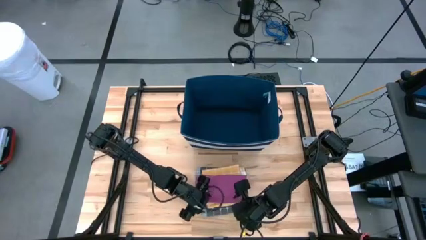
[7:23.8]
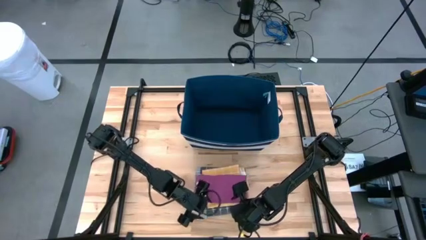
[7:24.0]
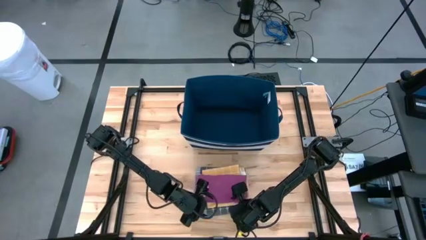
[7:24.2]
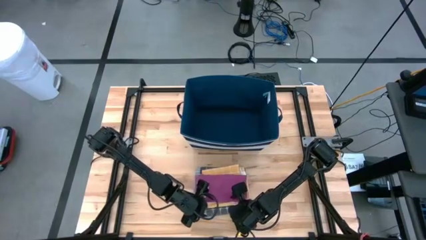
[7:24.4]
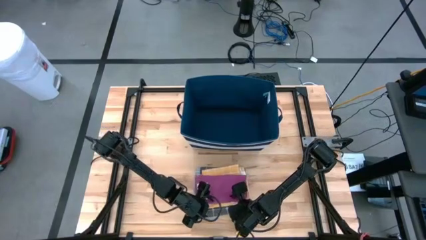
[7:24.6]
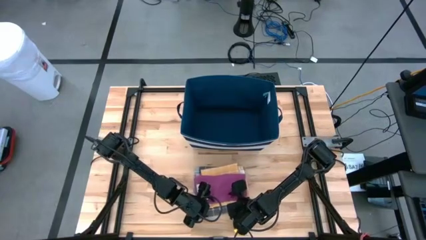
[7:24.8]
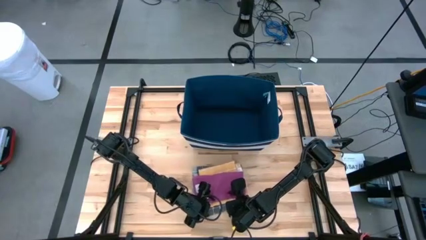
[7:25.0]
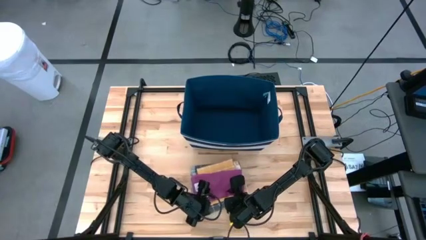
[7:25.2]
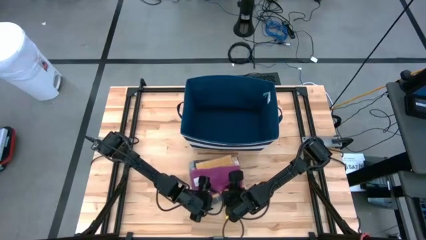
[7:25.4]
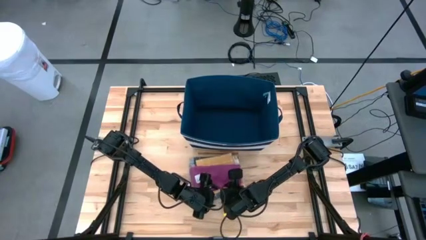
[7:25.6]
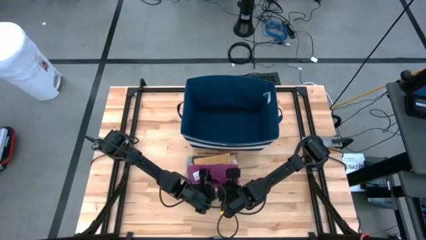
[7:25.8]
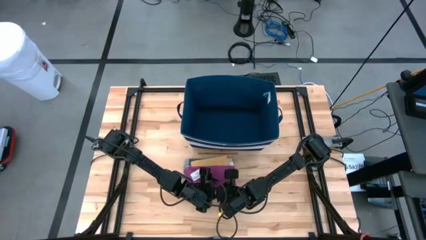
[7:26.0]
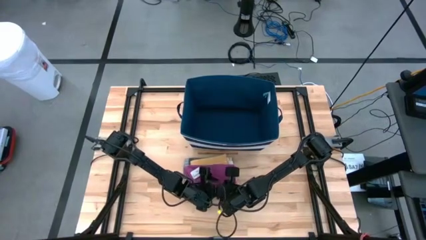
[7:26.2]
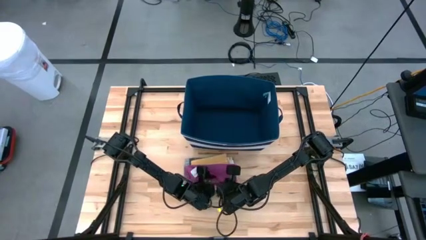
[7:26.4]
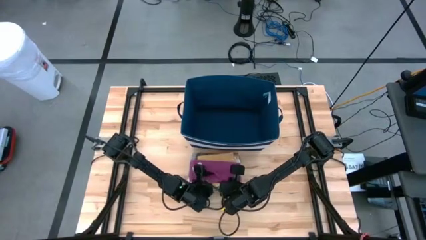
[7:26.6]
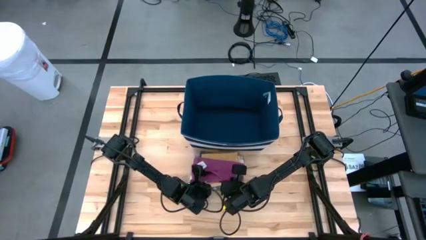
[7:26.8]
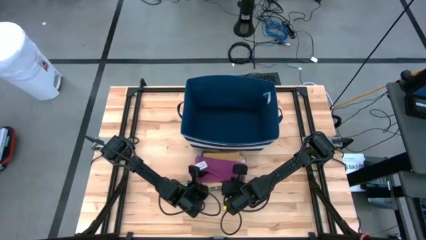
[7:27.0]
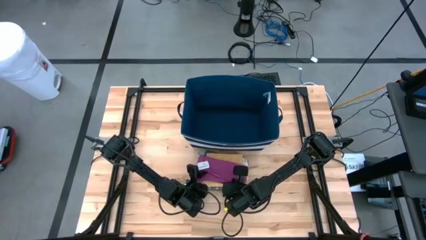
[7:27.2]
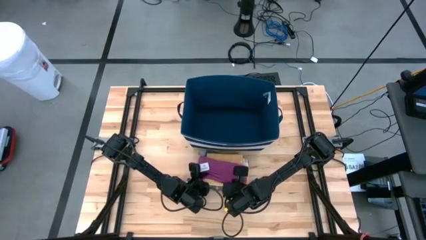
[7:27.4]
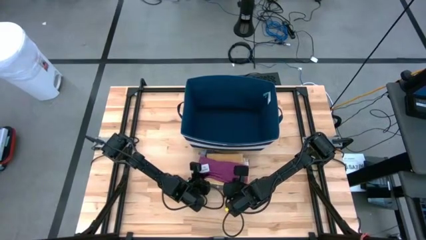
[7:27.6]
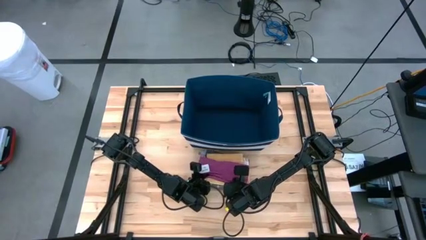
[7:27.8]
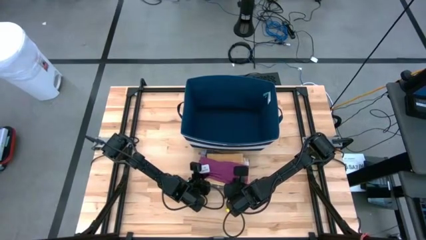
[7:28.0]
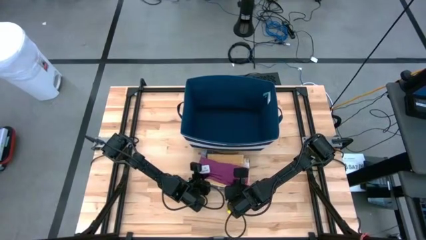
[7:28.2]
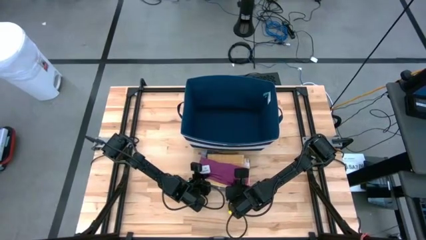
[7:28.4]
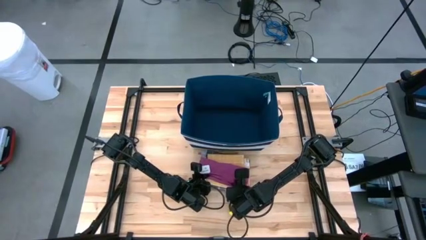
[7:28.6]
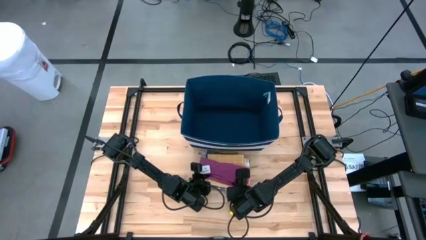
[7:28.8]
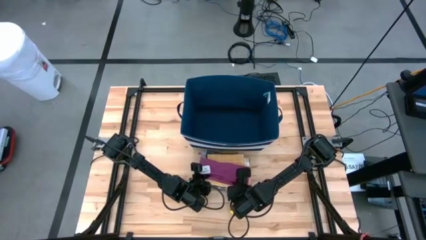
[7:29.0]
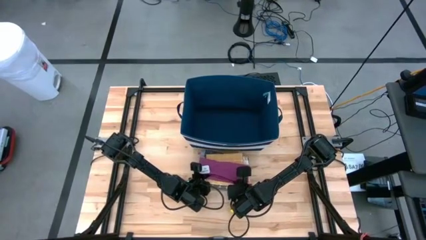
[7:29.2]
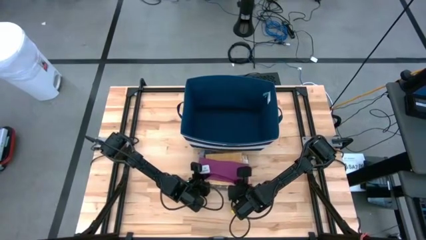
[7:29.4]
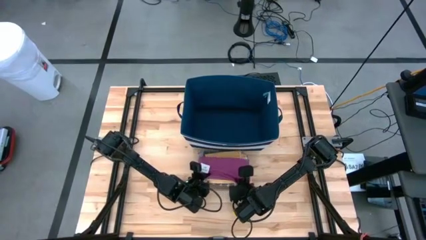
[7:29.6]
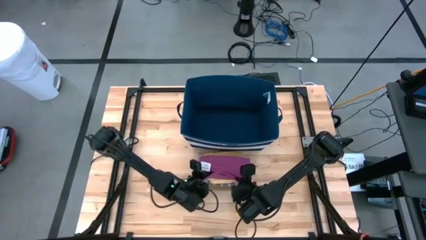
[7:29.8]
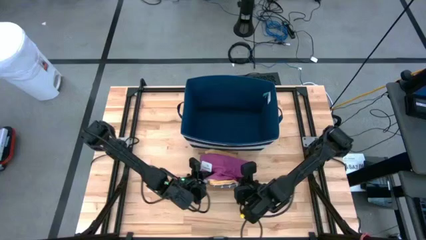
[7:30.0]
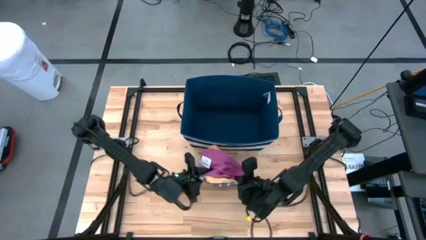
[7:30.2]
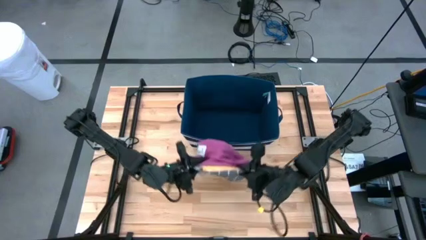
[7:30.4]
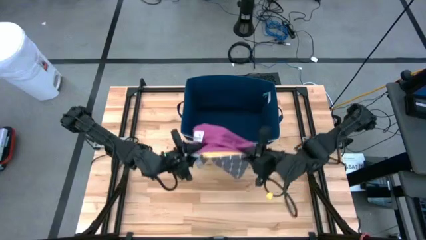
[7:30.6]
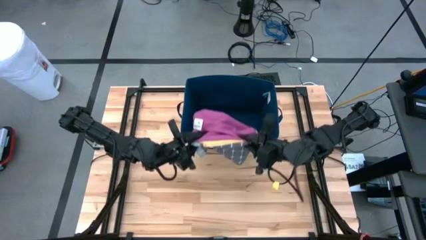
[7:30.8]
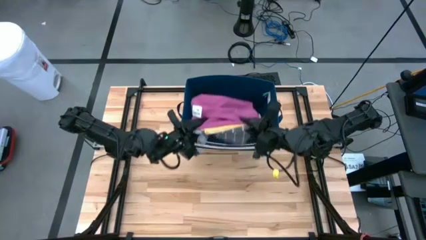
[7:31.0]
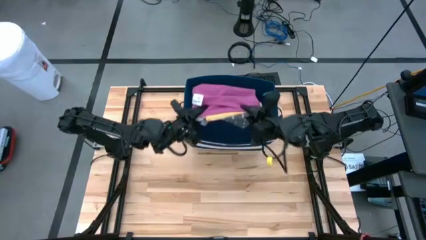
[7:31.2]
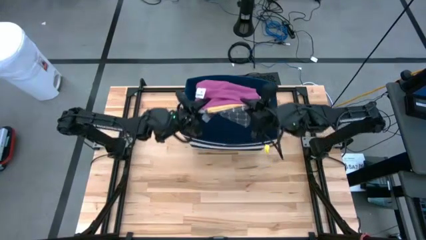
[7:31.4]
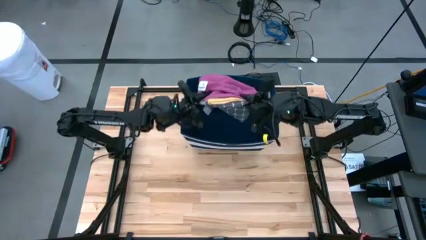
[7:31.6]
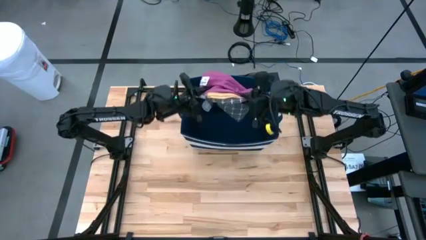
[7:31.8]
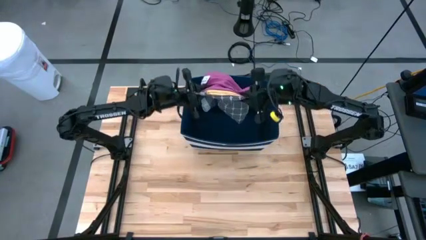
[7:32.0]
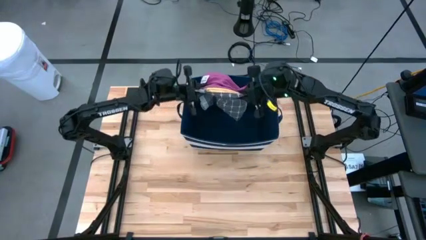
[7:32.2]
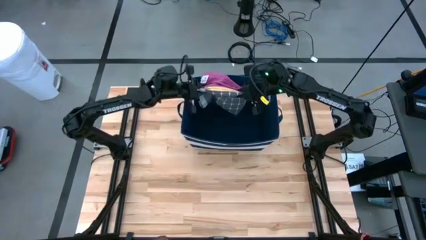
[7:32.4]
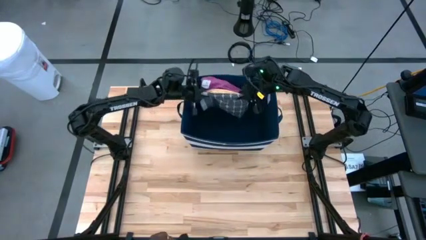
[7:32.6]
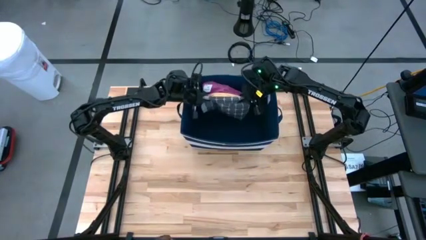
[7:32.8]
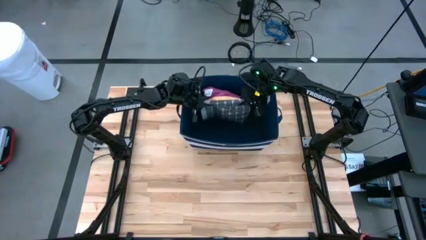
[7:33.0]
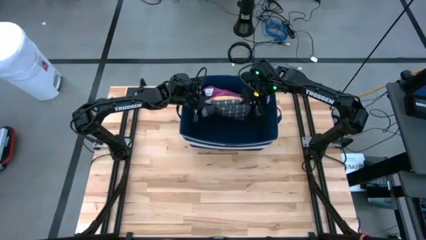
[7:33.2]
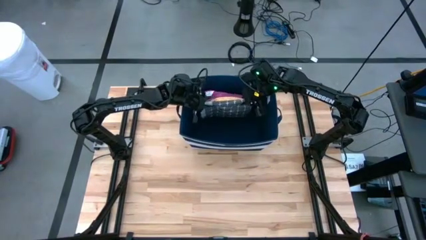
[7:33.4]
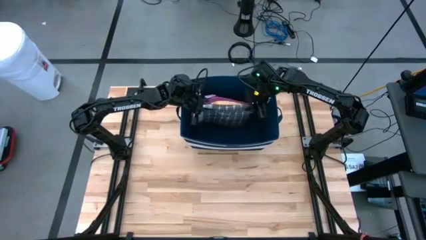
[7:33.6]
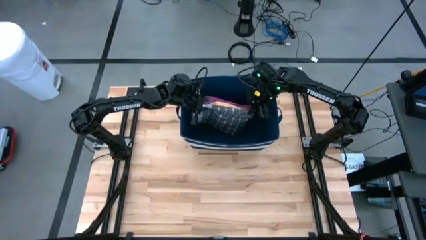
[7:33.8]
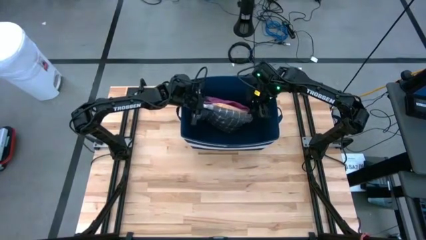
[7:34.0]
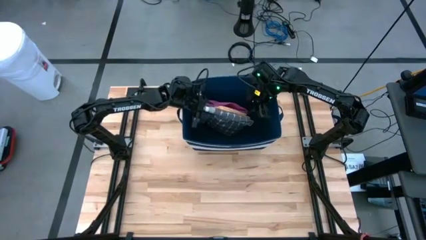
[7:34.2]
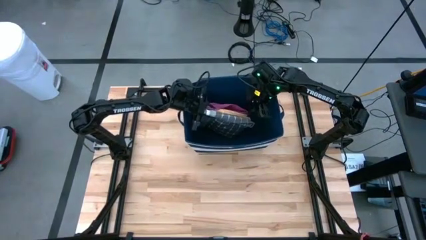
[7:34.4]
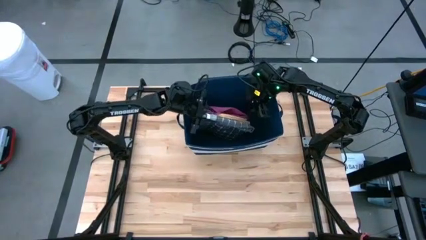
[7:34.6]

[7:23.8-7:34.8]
Task: Fold towel
Put the stacked towels into the blue bin

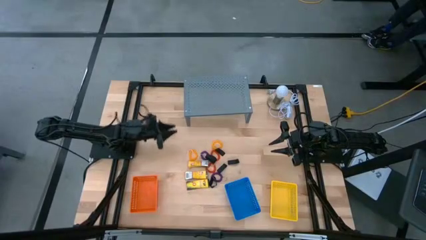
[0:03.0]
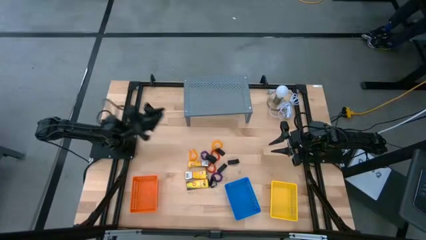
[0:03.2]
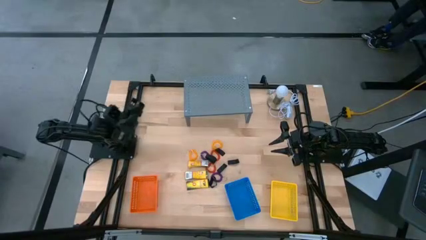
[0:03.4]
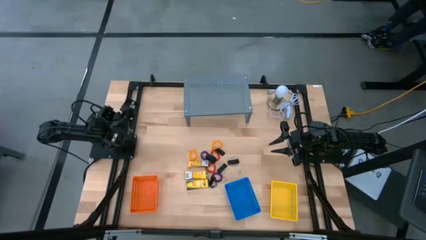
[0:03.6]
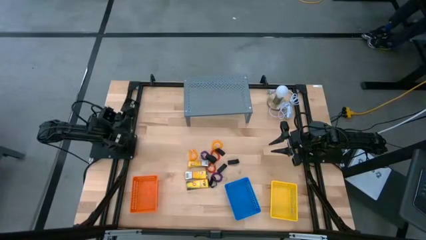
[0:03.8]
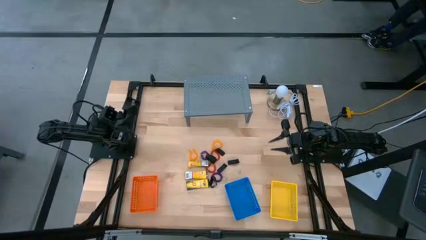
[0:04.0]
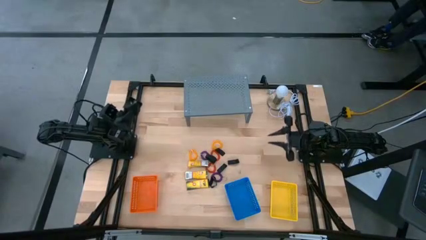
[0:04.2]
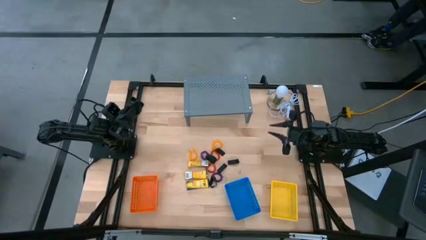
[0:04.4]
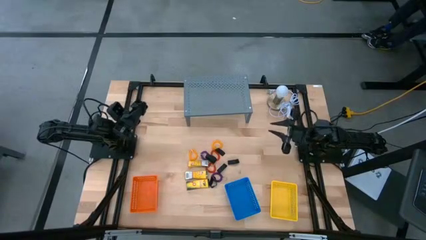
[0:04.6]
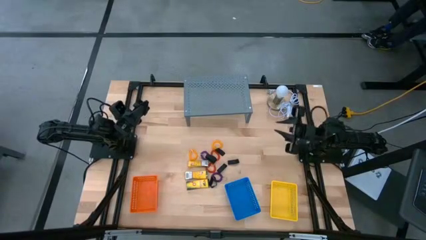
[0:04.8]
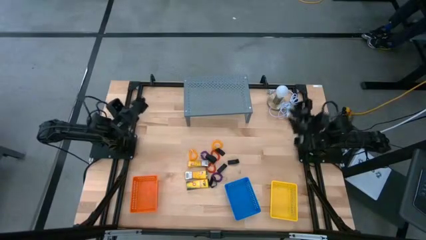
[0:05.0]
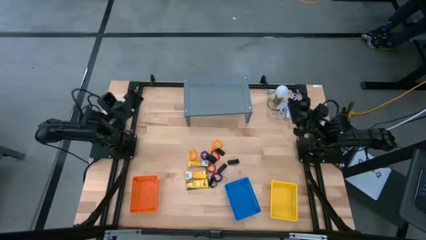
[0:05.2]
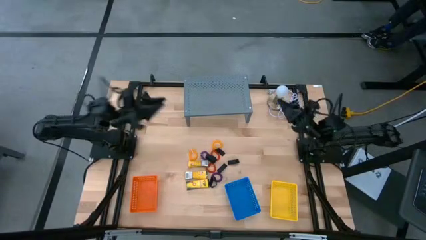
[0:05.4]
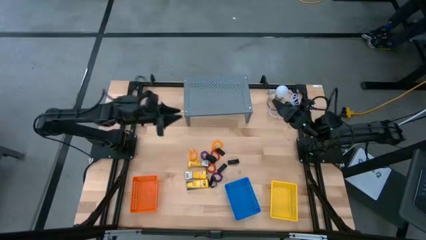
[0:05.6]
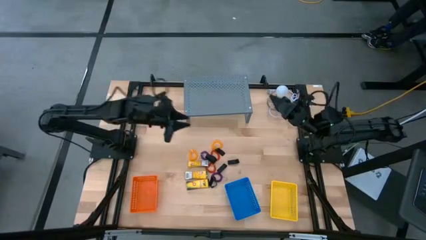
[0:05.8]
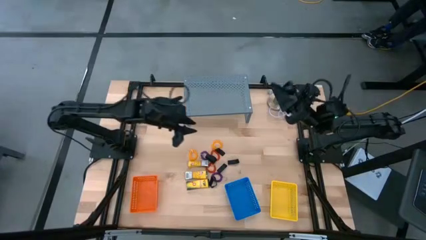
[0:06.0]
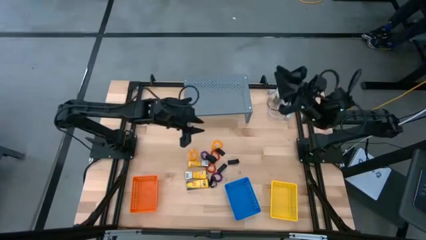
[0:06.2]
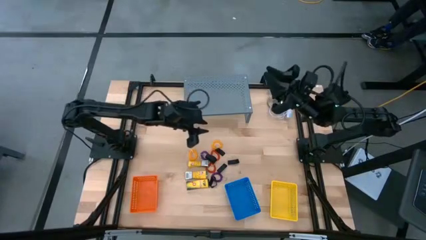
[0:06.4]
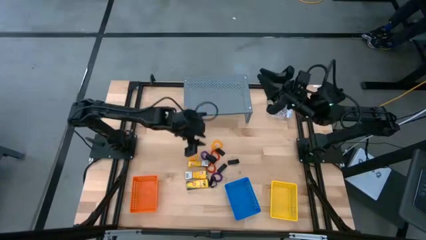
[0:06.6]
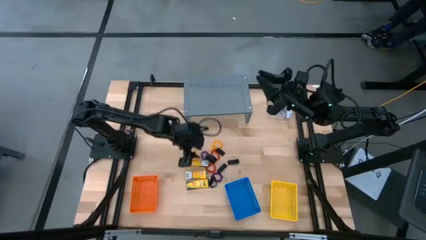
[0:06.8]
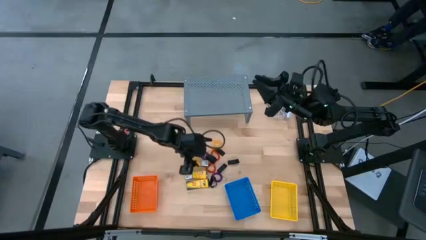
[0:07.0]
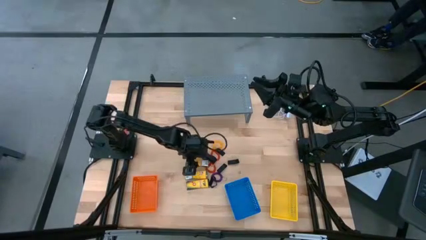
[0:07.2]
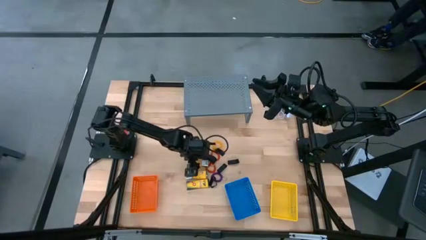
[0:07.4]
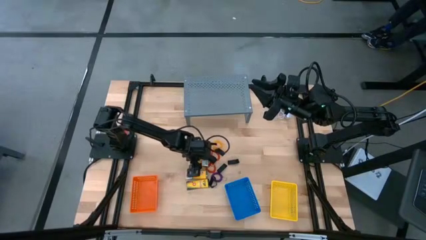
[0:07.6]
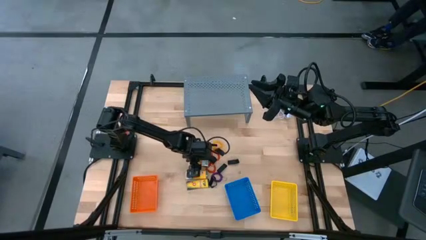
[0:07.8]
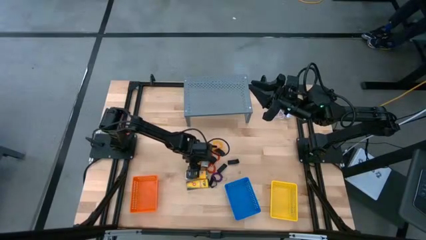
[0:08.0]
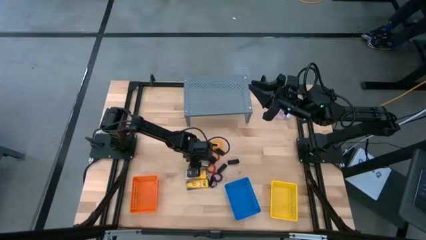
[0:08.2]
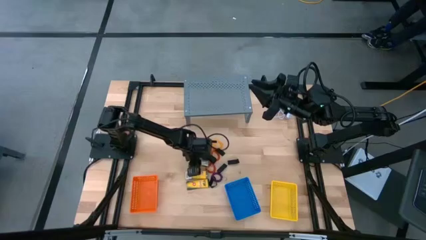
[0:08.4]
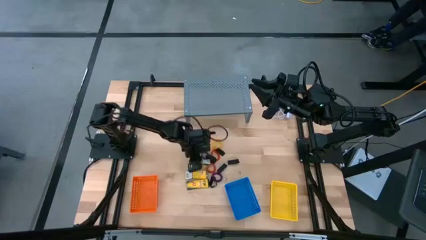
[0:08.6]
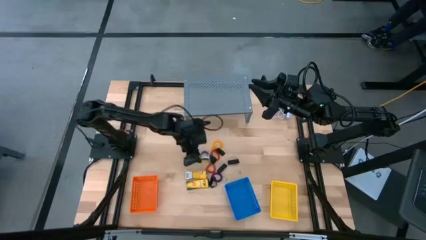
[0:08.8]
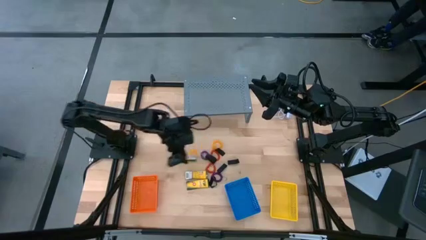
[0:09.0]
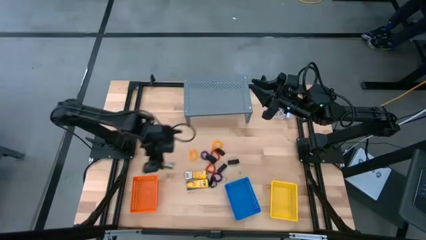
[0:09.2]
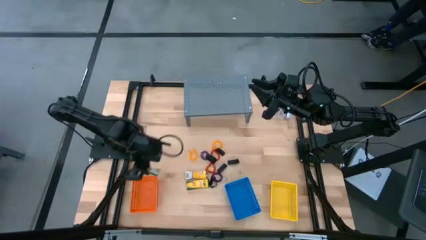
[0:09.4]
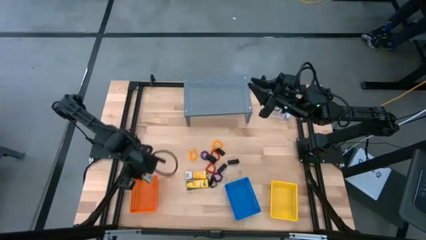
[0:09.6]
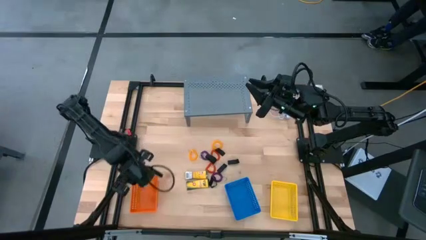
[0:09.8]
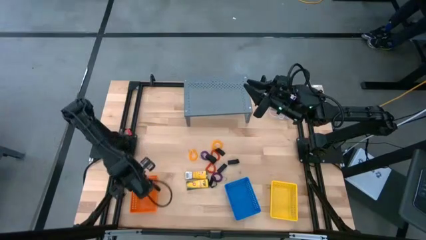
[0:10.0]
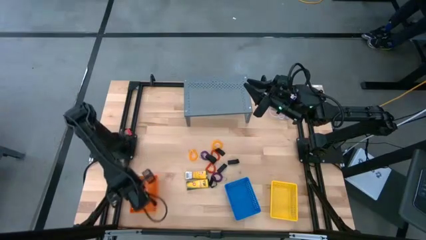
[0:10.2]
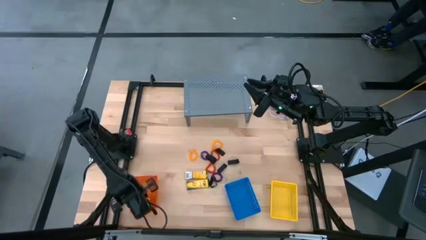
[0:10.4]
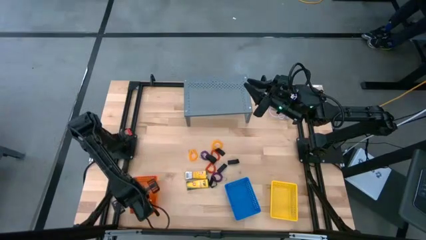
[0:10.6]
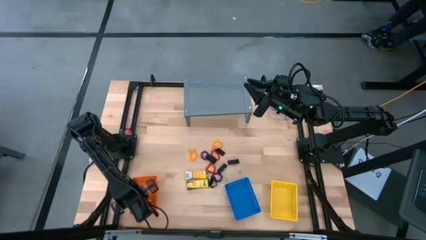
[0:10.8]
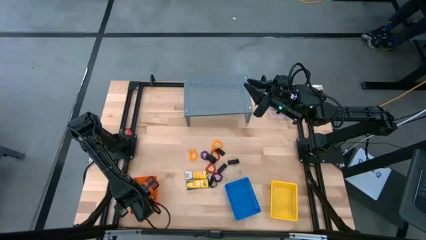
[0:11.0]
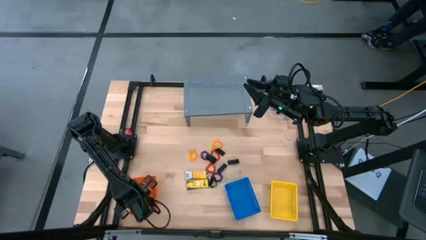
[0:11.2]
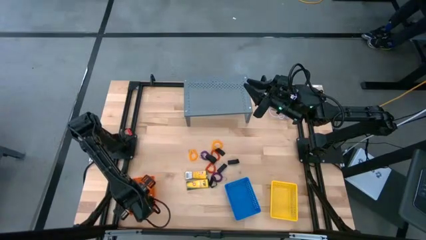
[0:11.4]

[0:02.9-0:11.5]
Task: Pick & Place Office Desk Supplies
Put the yellow crayon box into the orange bin
